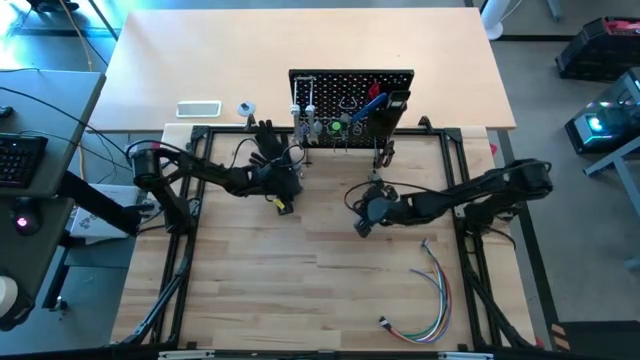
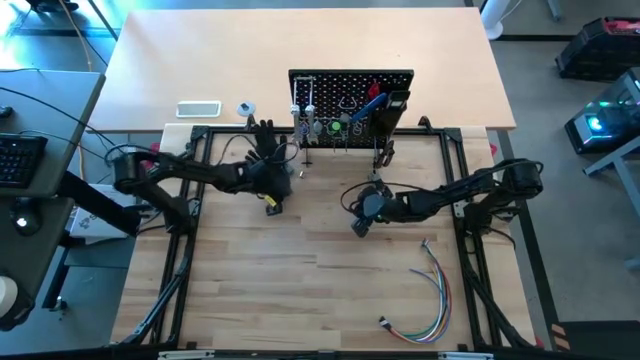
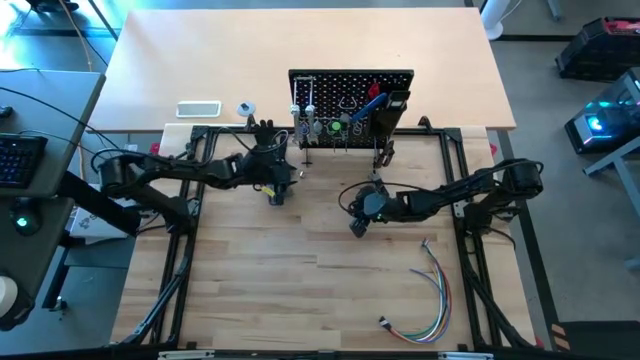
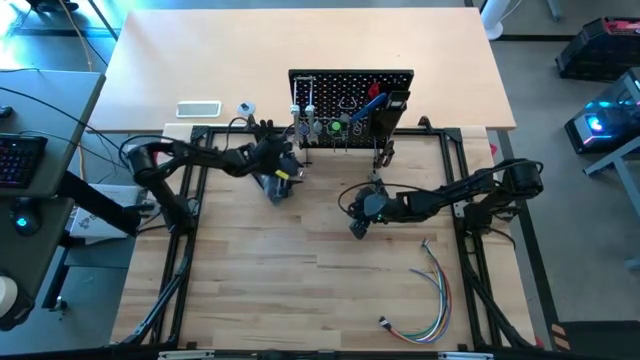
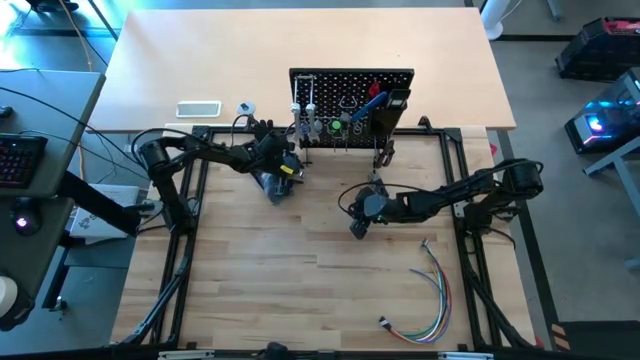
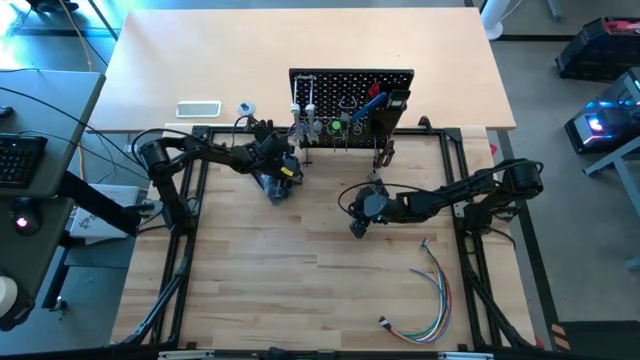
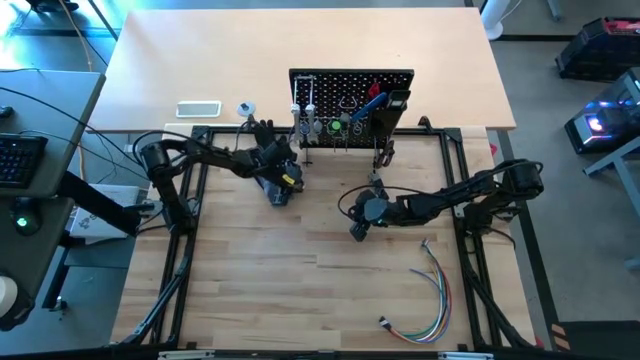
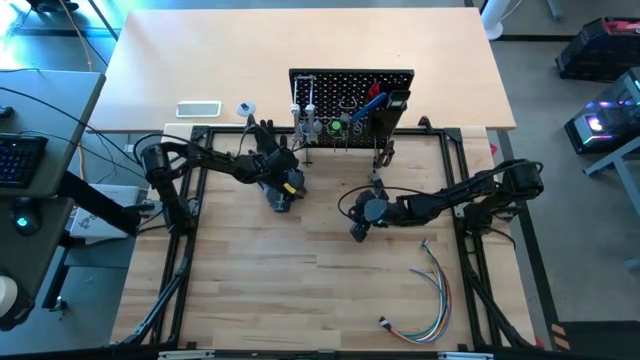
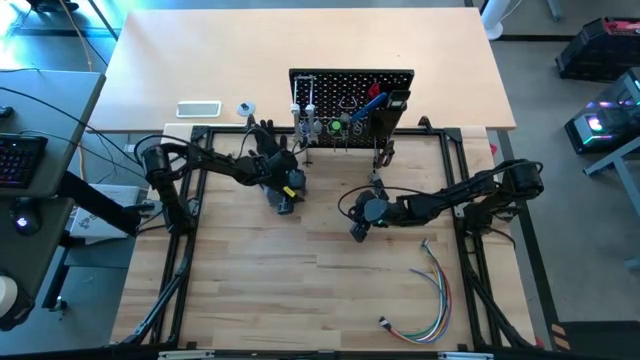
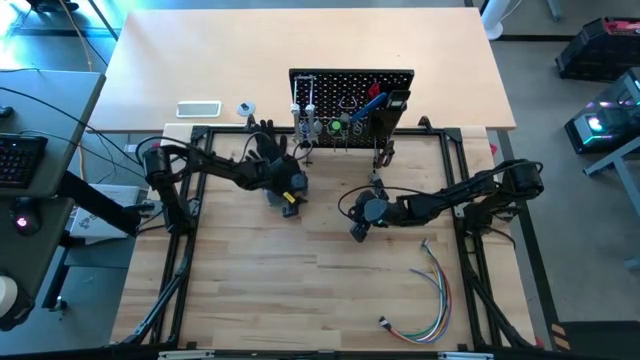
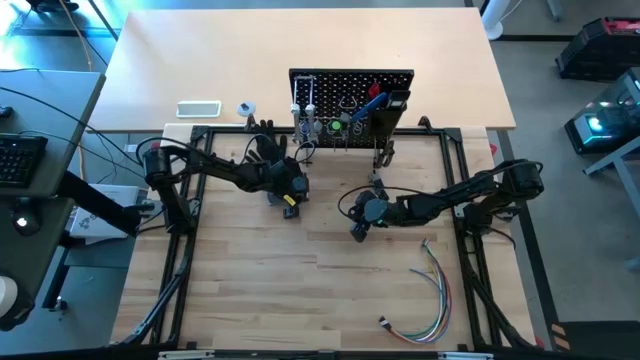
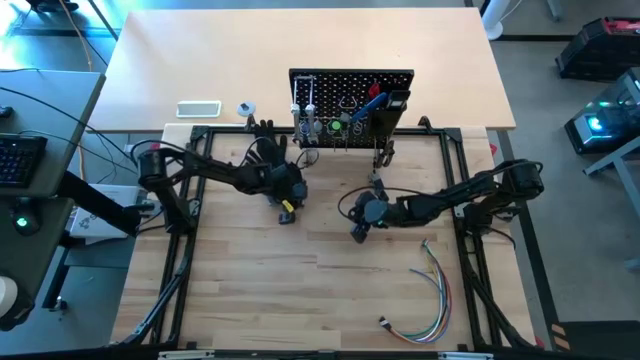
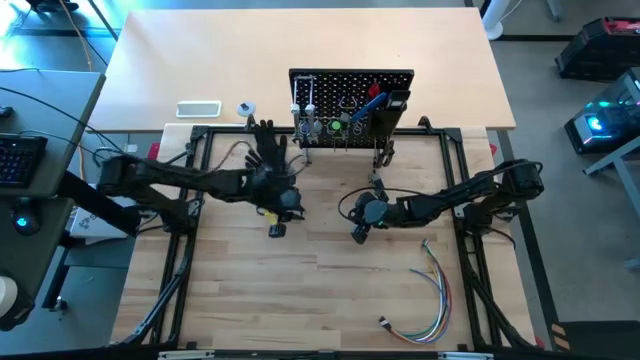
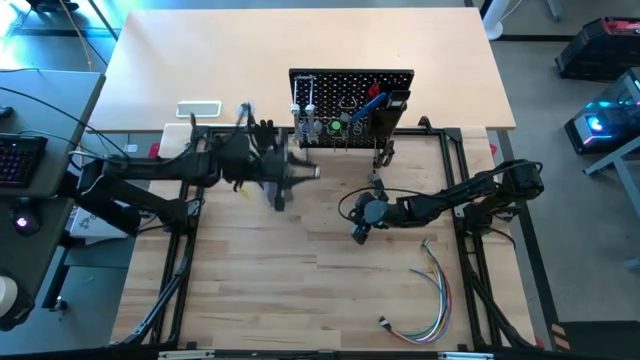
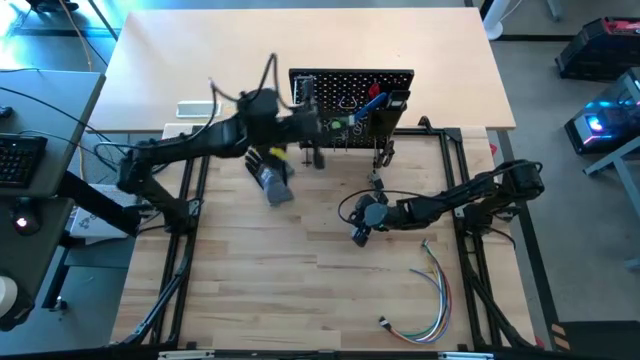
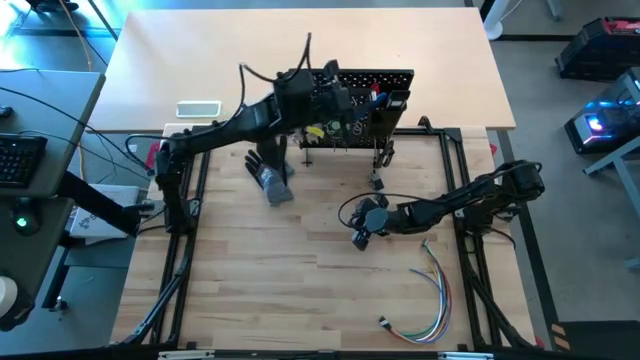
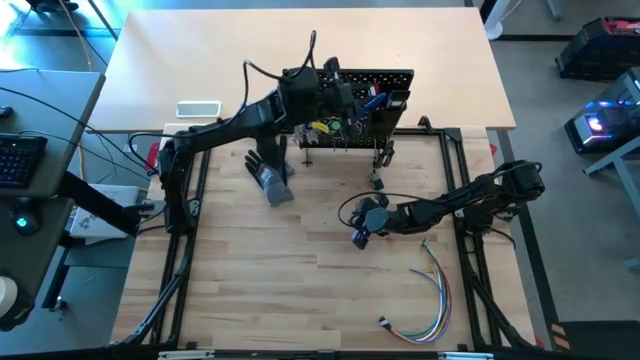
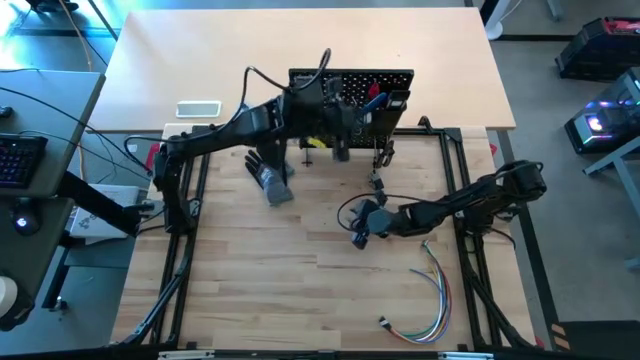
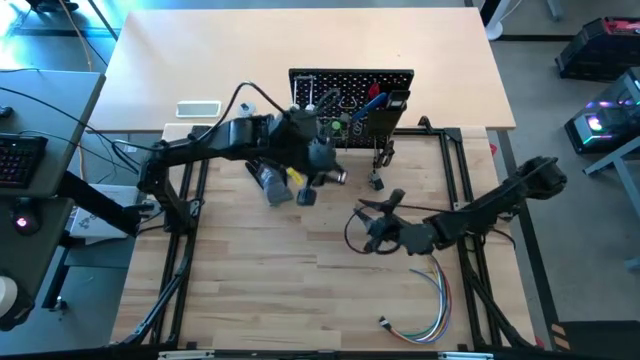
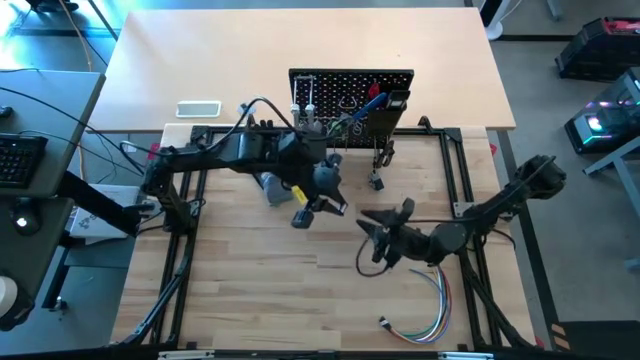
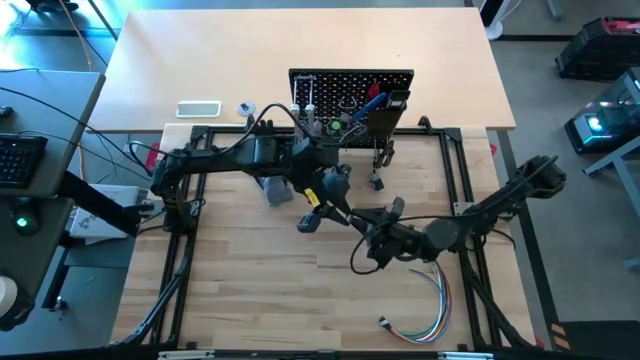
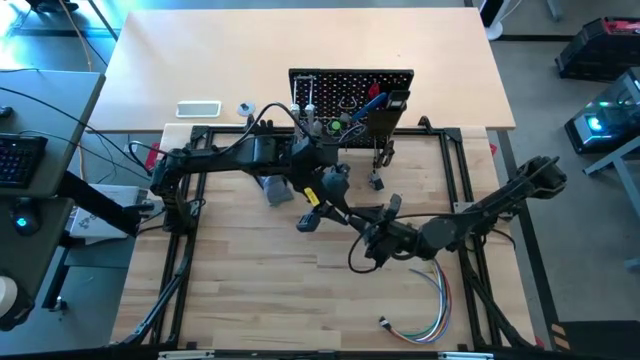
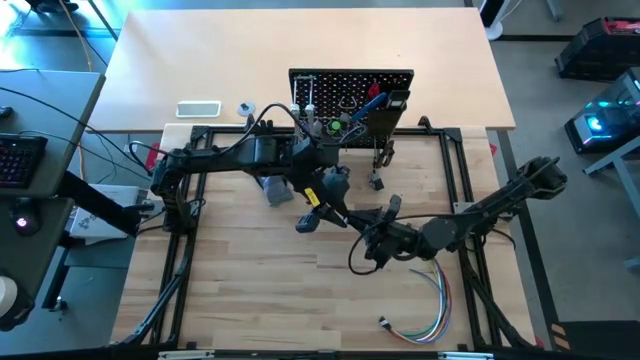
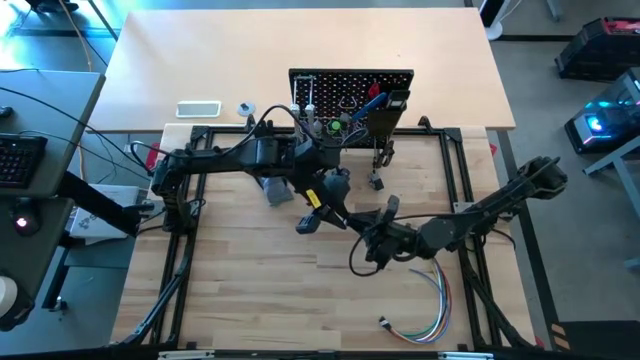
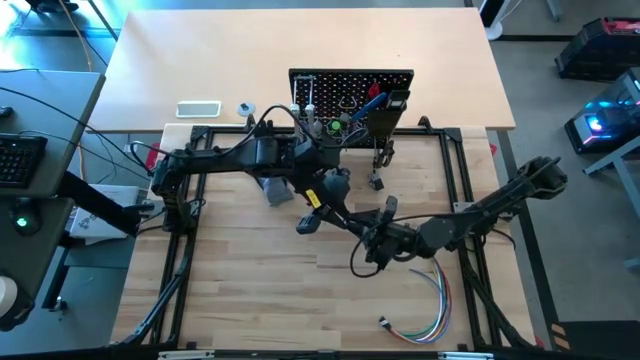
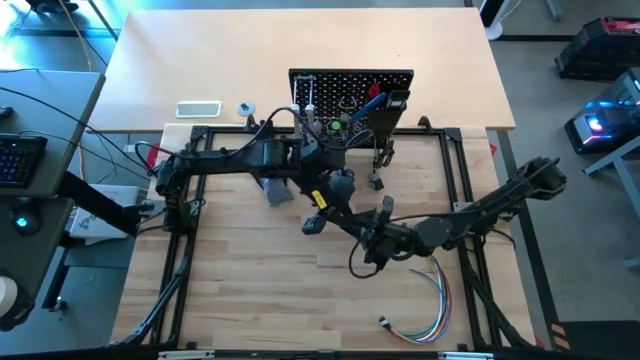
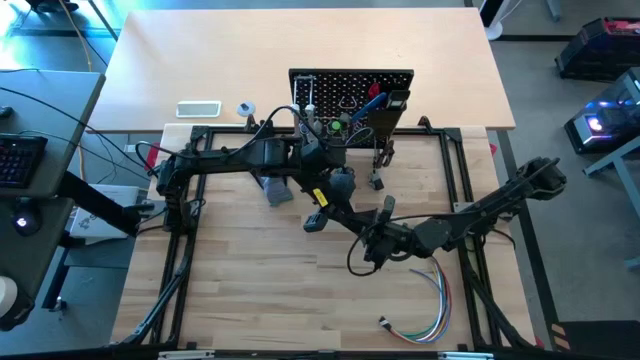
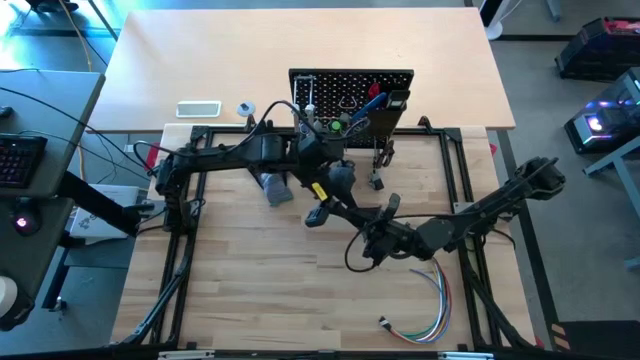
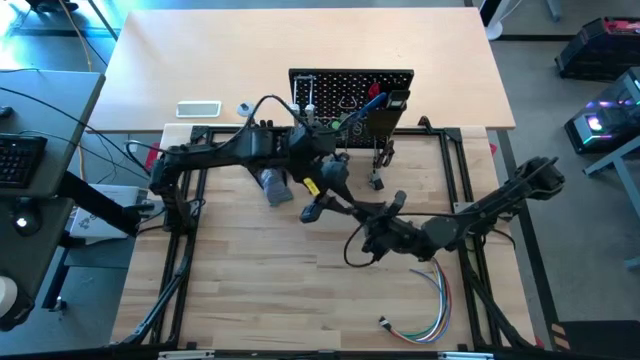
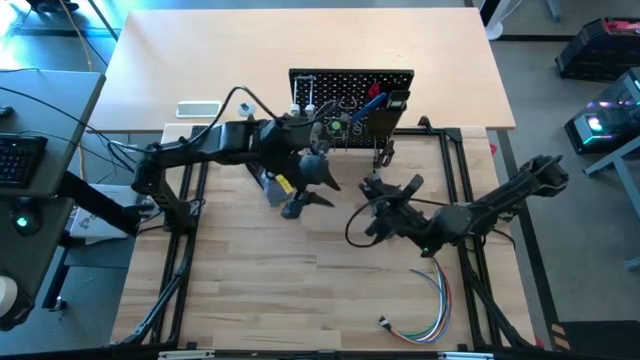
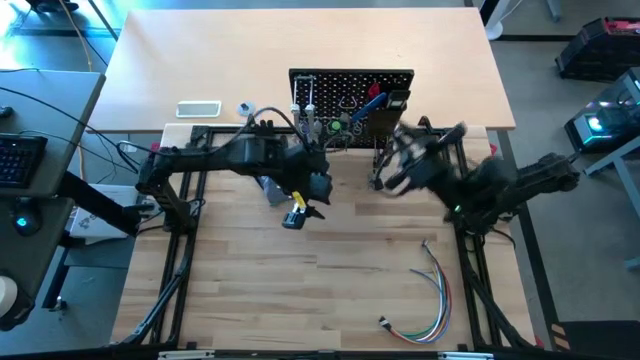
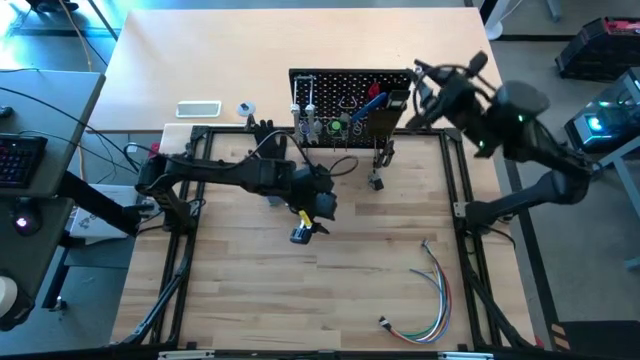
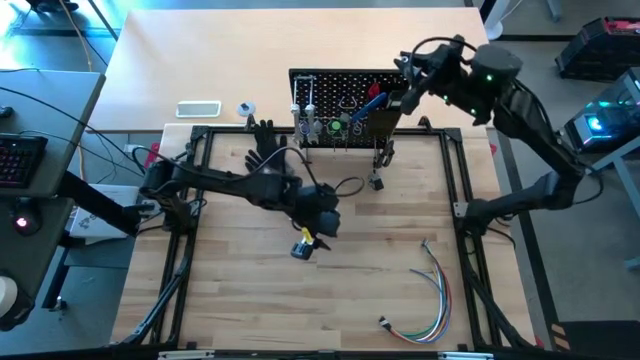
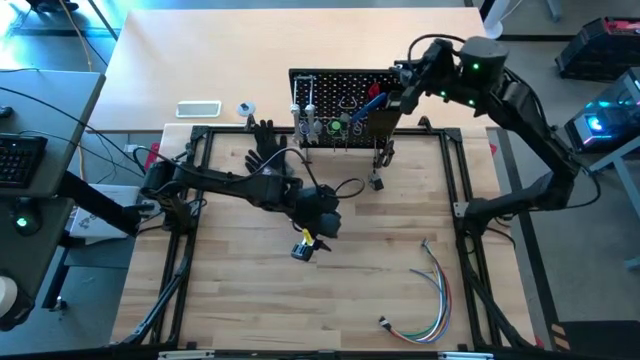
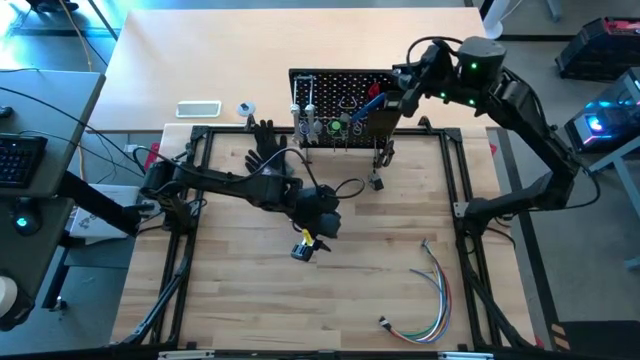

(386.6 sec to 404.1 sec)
Task: Hang tools onto peg board
Put the silver socket into the black bin on the pegboard
